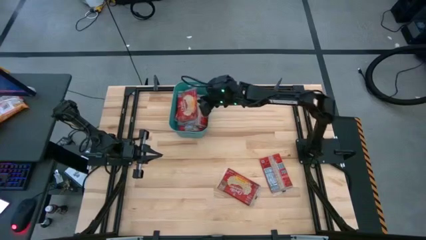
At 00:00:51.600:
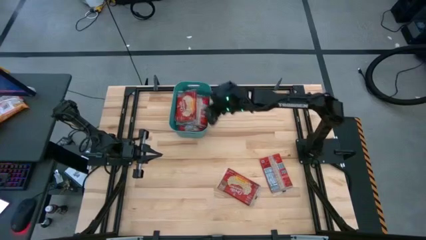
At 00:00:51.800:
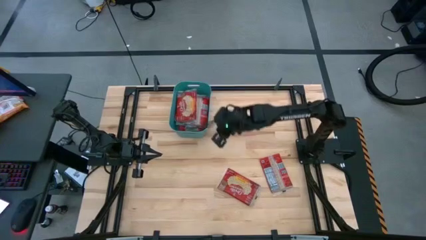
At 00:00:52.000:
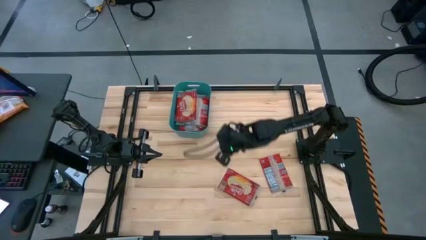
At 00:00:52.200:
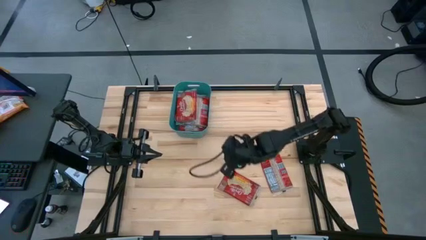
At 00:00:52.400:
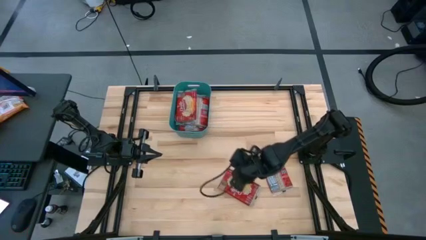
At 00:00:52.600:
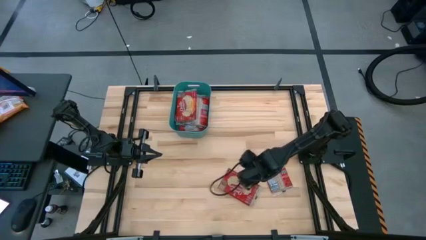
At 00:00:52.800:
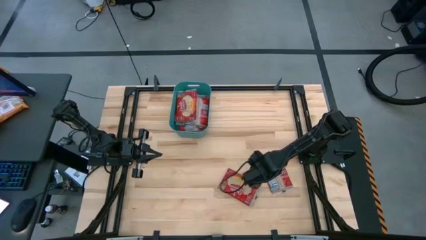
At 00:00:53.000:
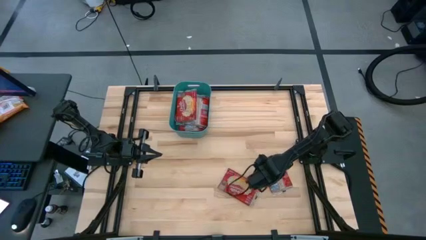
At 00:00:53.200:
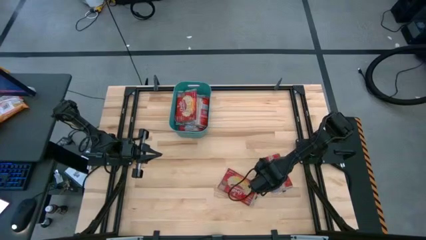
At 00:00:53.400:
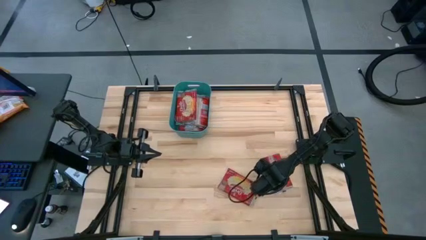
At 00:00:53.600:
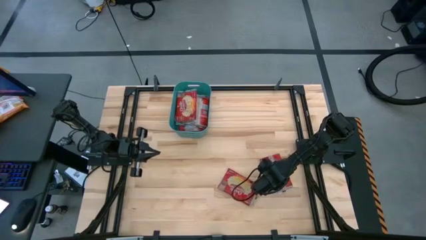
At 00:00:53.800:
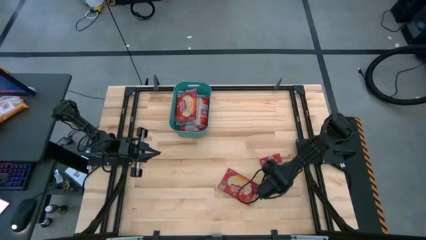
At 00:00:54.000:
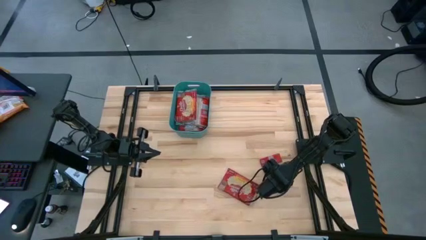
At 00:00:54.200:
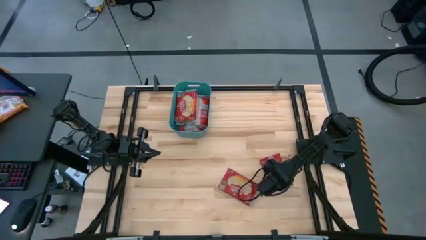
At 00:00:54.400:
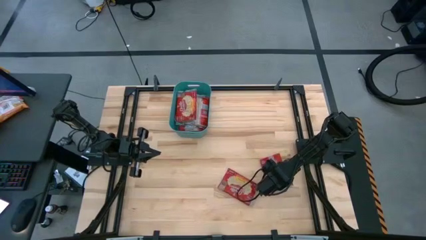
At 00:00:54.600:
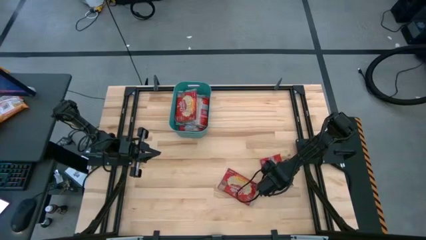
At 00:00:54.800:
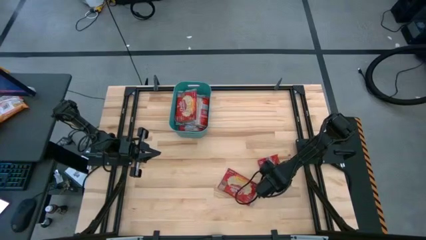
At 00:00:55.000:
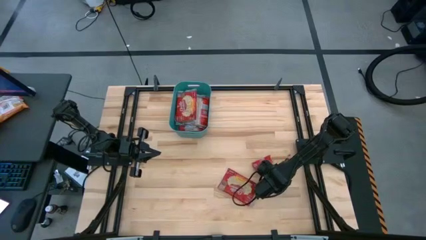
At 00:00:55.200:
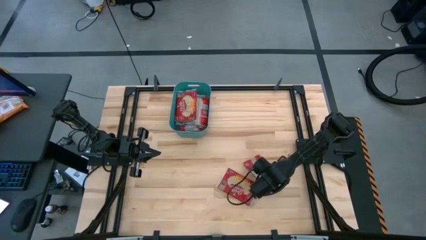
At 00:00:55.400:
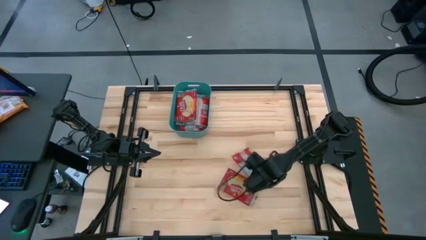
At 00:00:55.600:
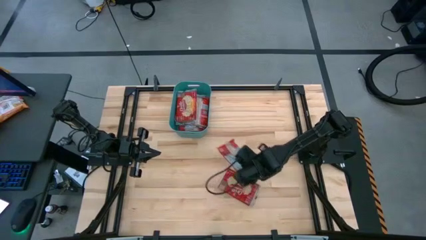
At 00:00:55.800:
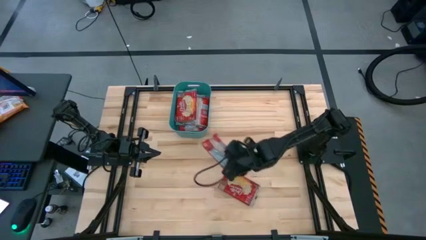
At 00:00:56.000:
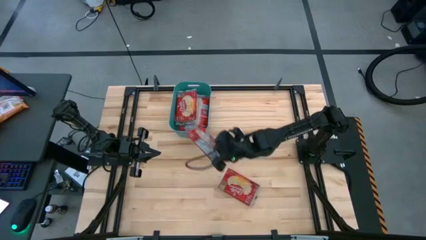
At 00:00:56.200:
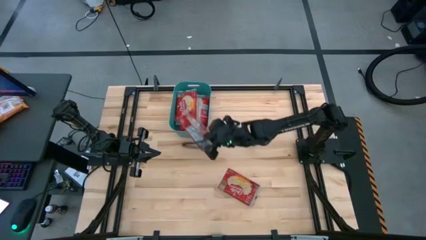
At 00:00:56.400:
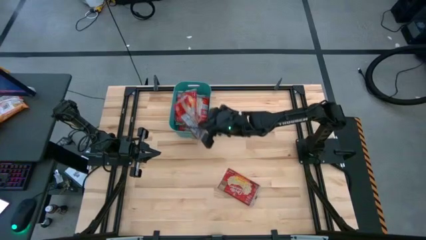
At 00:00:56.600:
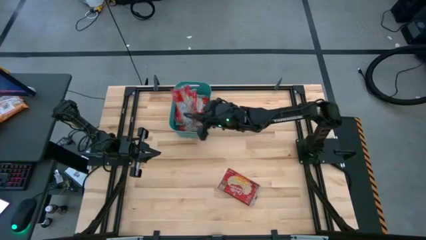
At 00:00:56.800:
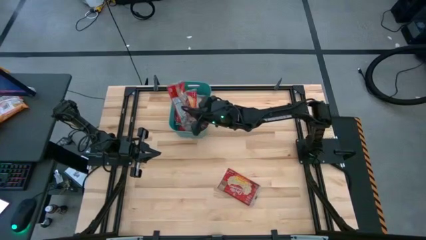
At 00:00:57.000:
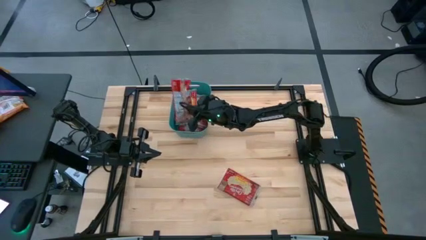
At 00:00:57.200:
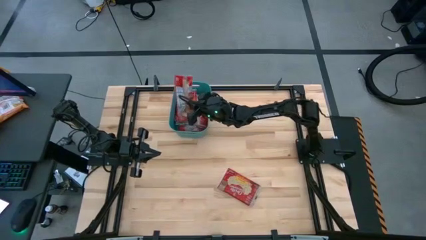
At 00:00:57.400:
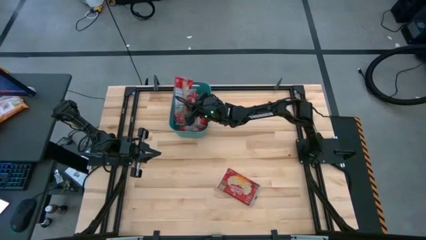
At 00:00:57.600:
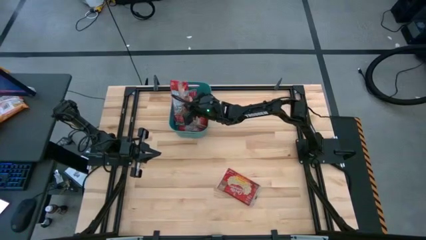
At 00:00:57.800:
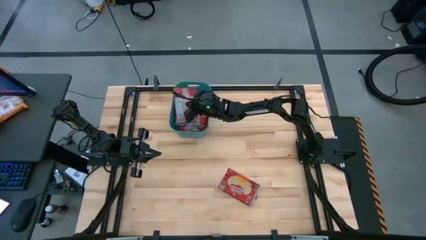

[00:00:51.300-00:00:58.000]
Task: Sort popcorn bags into baskets
Put the red popcorn bag into the green bin

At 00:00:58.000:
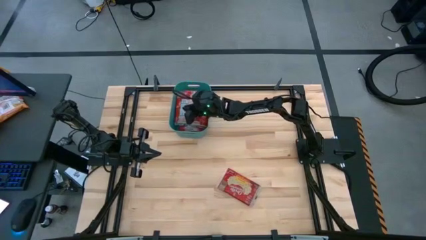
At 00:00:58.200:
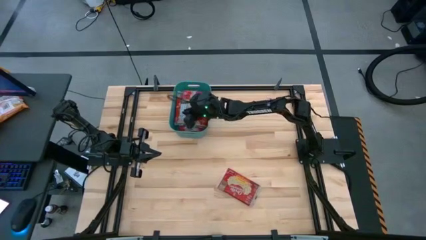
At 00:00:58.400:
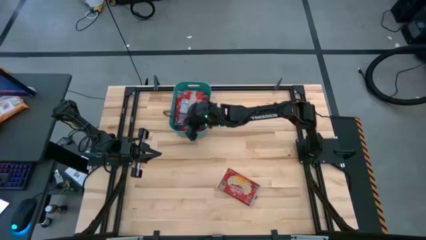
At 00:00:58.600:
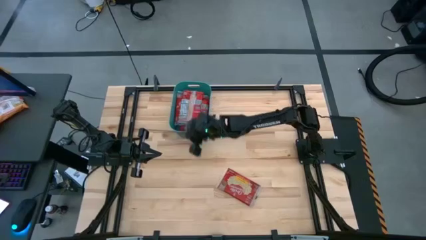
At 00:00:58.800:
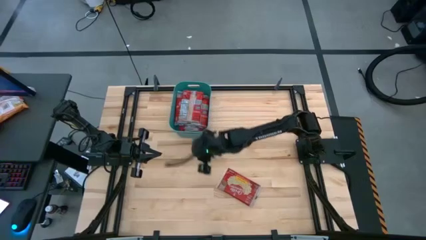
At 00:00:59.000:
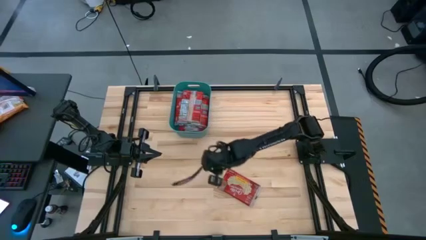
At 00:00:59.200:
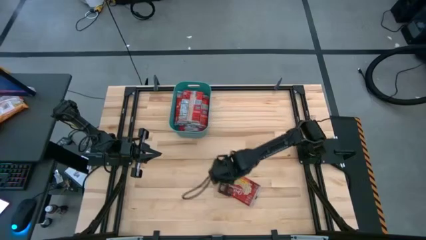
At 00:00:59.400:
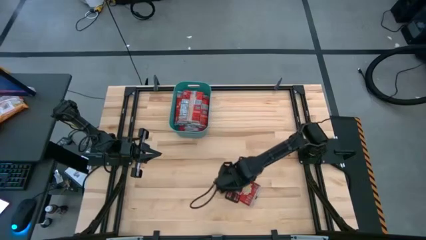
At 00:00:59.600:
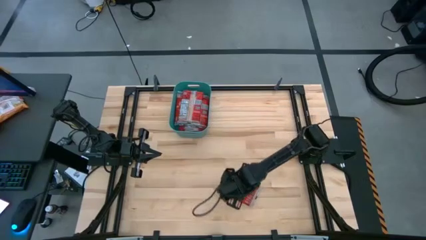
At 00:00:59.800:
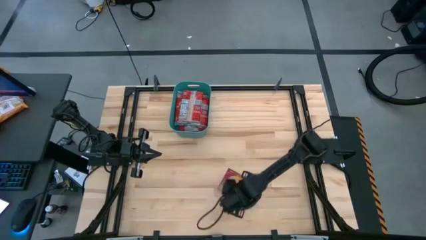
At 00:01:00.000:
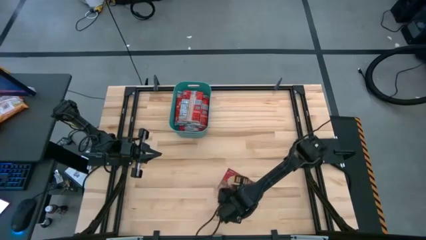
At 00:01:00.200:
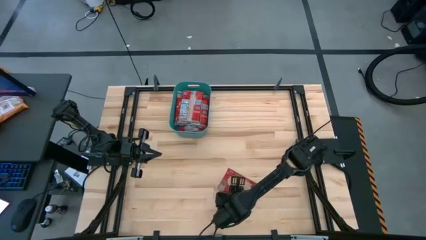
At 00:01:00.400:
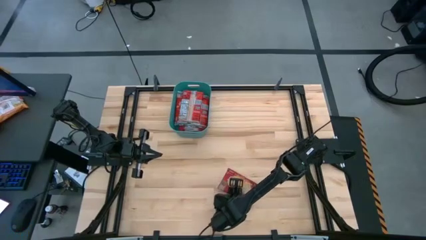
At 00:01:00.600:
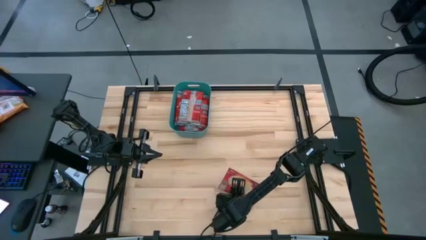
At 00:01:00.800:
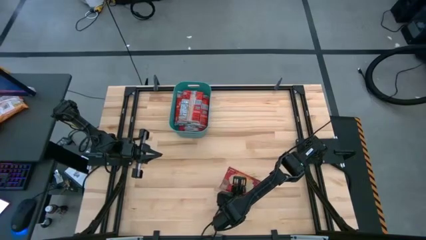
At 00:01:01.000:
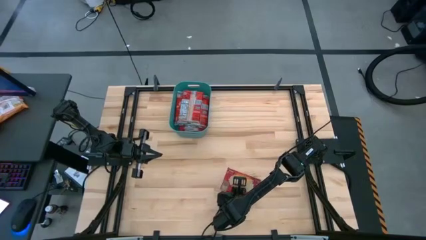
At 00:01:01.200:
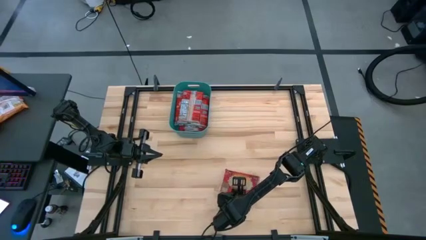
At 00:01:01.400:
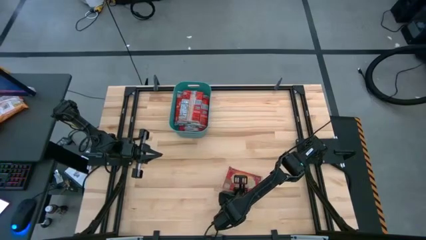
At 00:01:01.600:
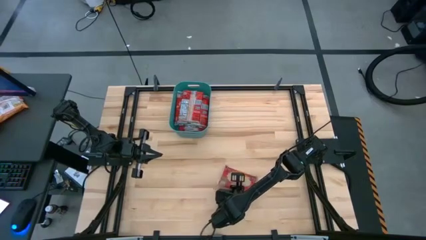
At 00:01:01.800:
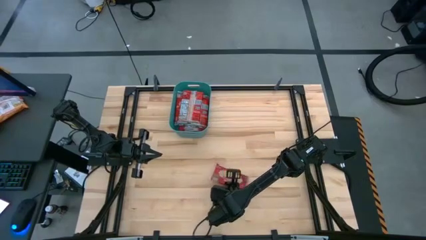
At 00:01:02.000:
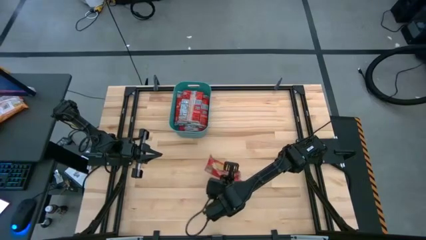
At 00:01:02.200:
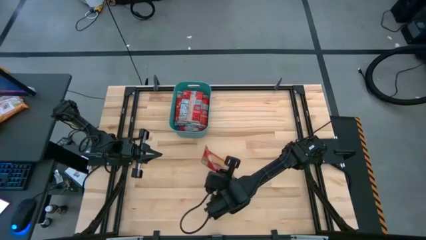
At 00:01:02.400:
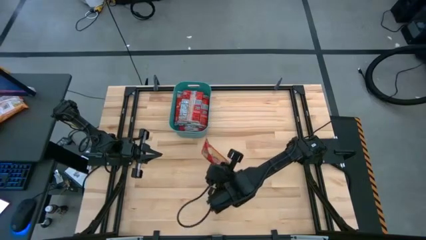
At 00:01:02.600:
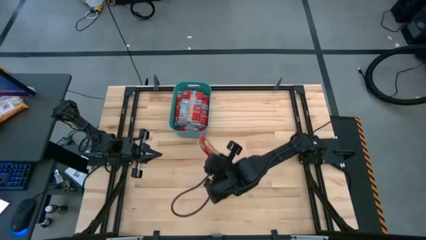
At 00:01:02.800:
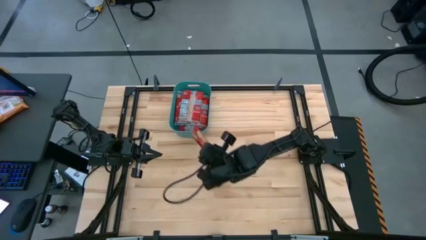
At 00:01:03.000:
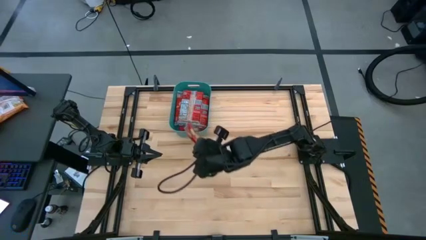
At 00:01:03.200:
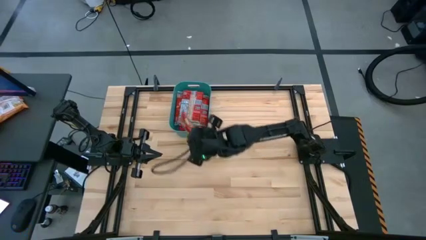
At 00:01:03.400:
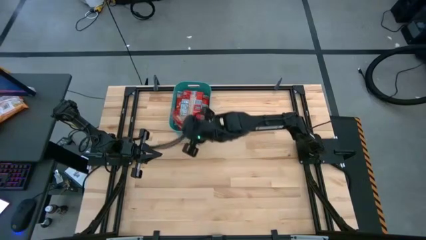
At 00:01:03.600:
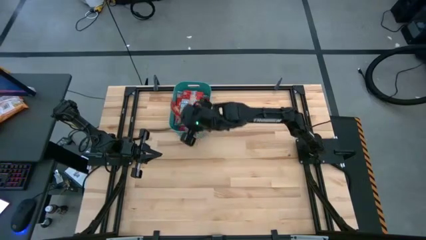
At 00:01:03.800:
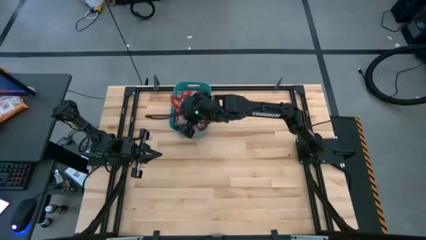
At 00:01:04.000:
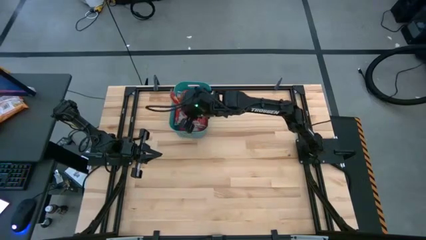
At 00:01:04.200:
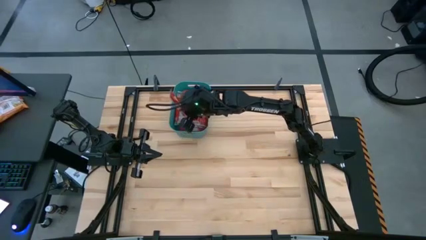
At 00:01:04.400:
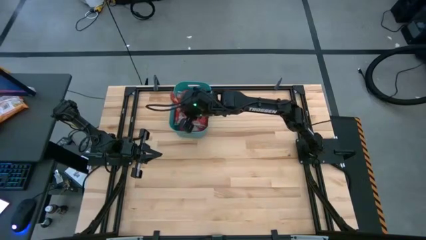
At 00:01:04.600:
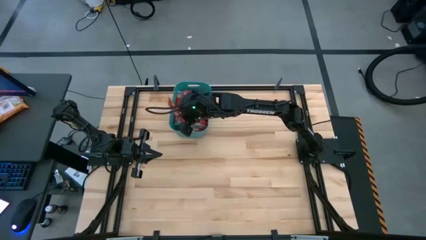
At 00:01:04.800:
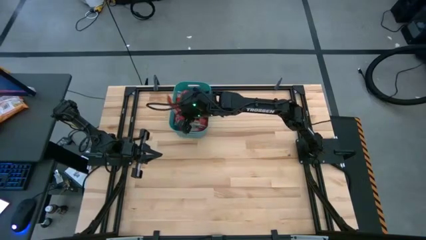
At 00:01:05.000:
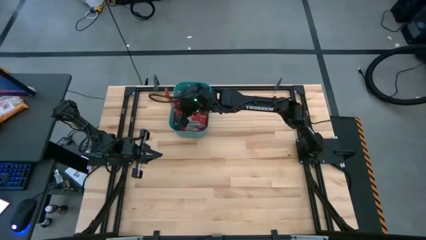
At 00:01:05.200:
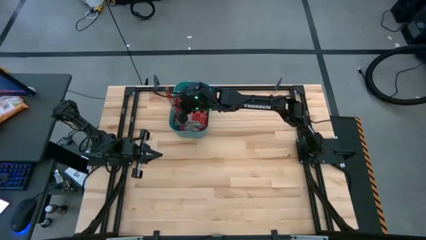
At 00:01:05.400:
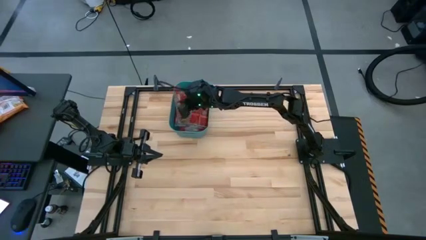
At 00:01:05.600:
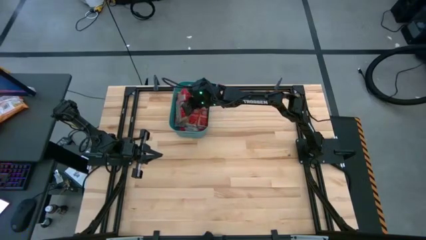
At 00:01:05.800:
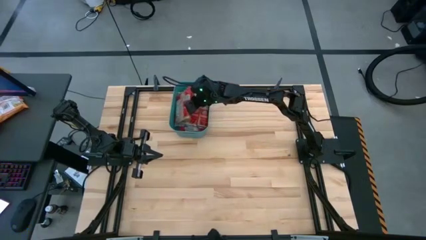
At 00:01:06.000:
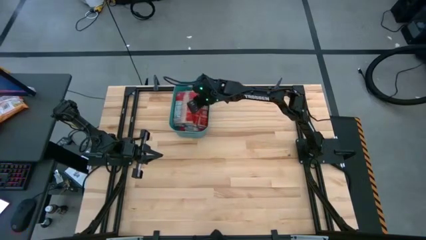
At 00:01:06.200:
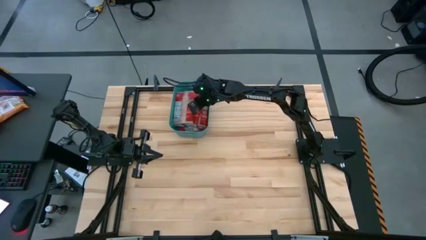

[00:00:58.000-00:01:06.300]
Put the red popcorn bag into the green bin

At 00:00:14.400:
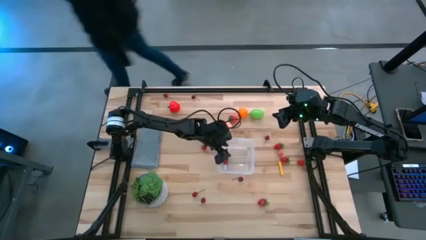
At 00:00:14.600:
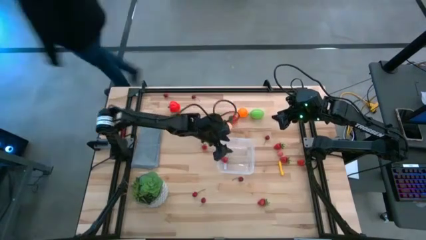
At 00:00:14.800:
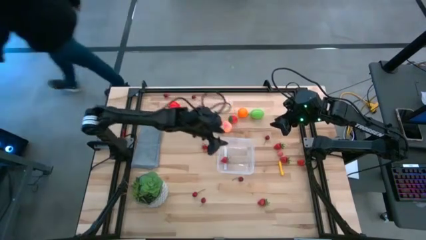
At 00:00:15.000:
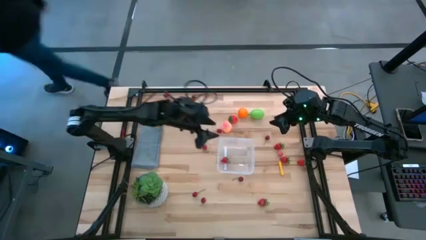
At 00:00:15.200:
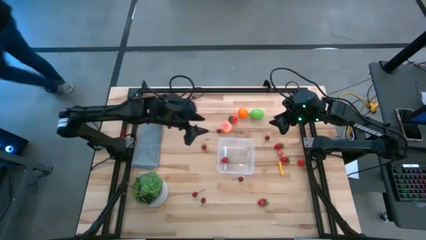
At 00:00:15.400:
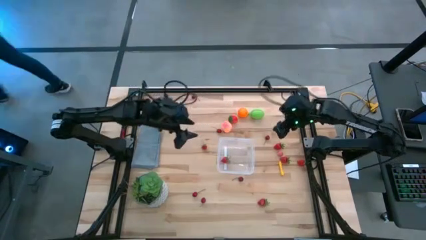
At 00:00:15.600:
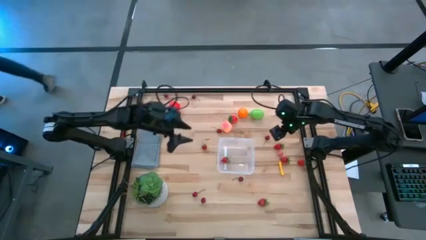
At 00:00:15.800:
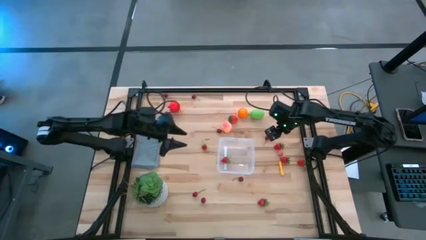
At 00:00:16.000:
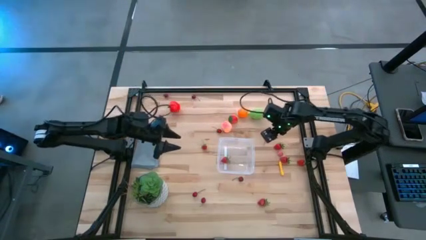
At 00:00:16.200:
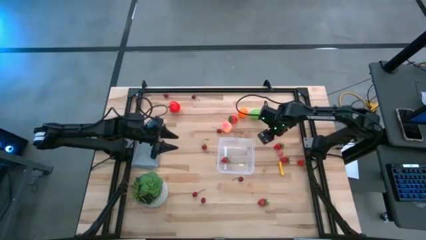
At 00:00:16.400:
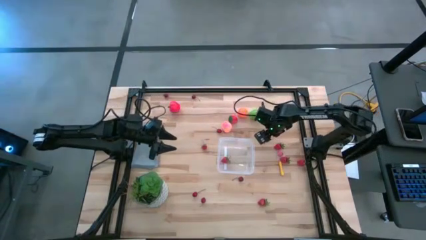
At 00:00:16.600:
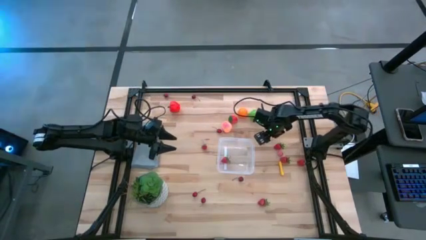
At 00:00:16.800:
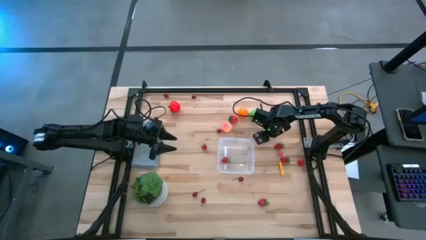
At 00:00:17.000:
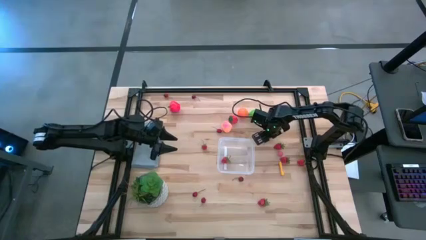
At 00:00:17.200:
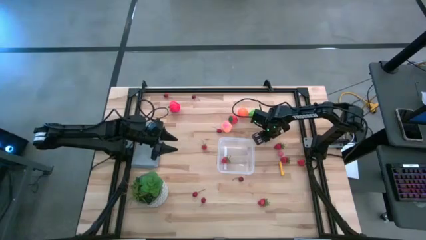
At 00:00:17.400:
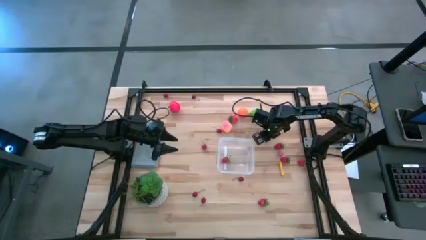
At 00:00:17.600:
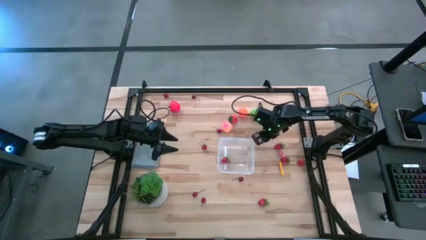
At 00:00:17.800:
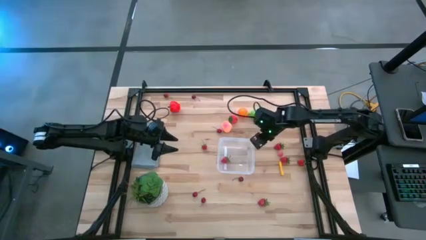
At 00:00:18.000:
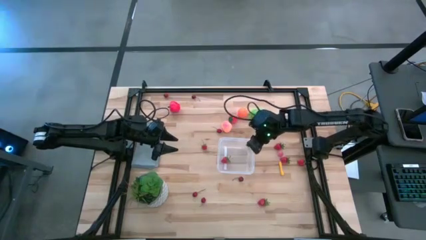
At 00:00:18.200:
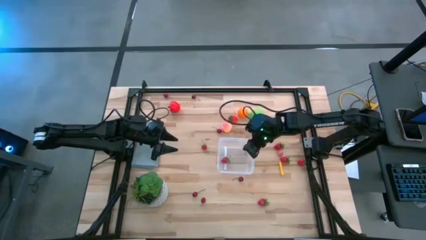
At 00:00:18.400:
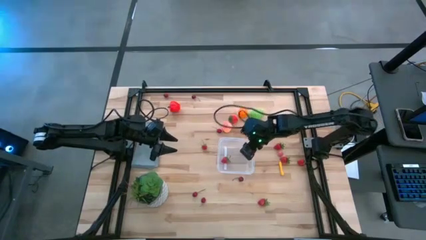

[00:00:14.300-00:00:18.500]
Task: Pick and placing Produce into tupperware
Put the cherry into the transparent bin
